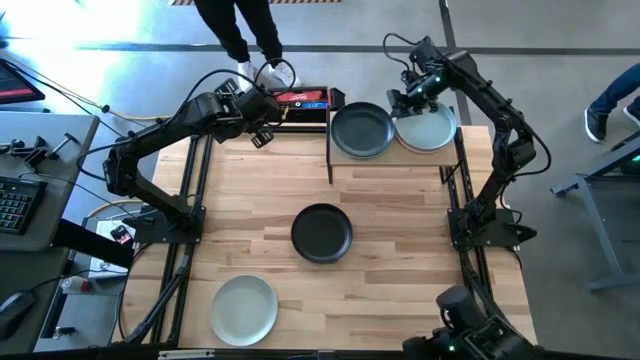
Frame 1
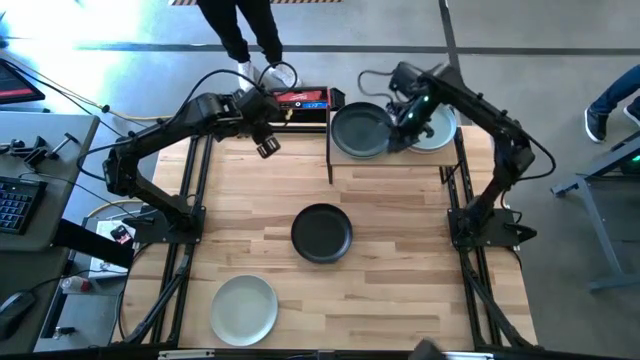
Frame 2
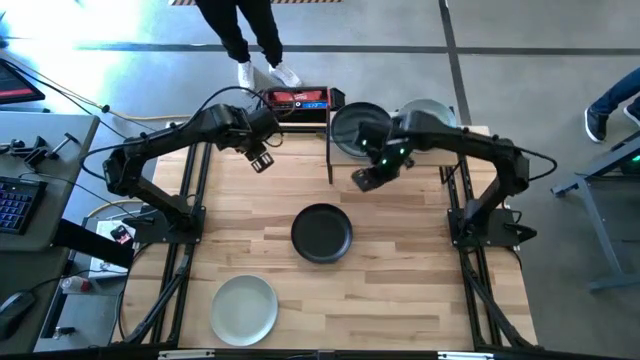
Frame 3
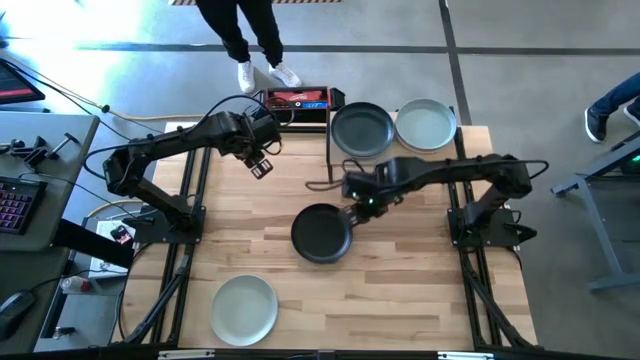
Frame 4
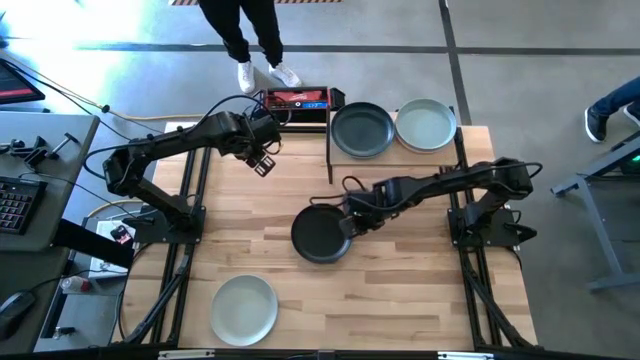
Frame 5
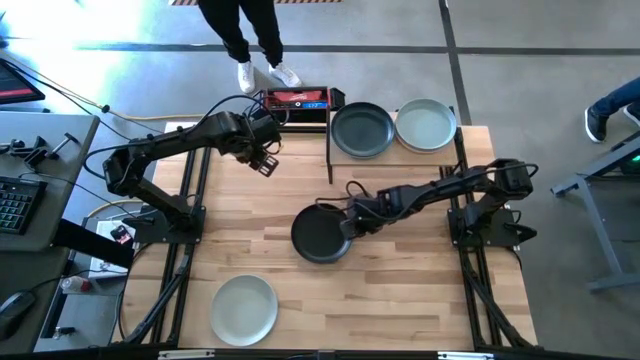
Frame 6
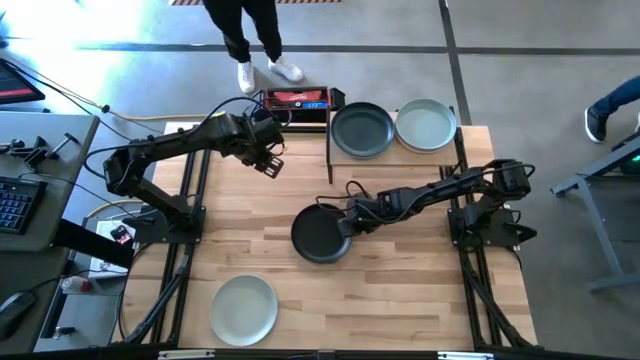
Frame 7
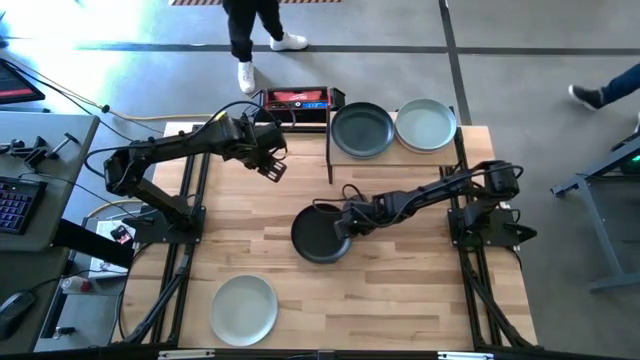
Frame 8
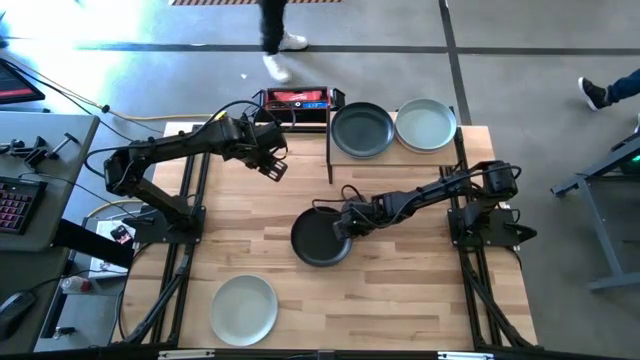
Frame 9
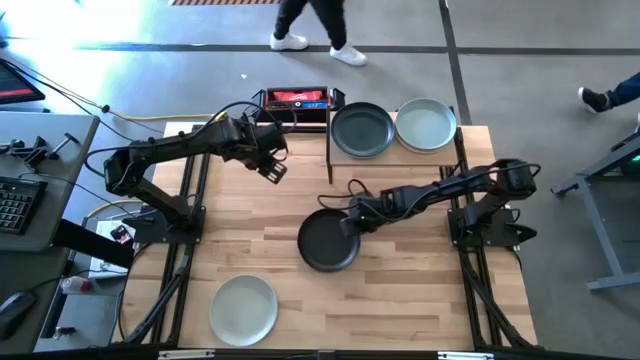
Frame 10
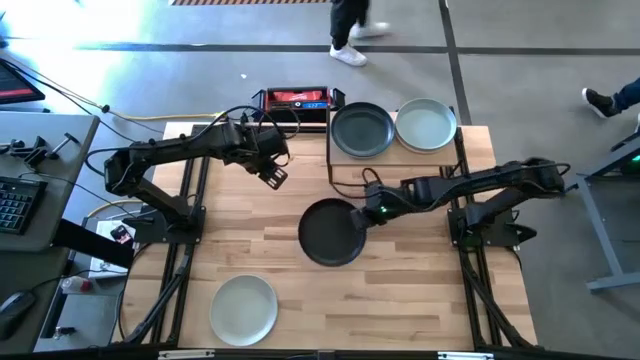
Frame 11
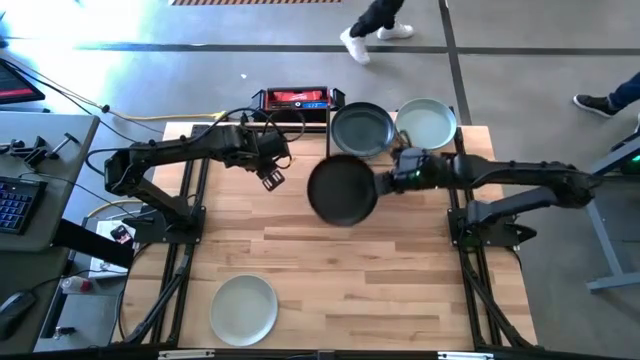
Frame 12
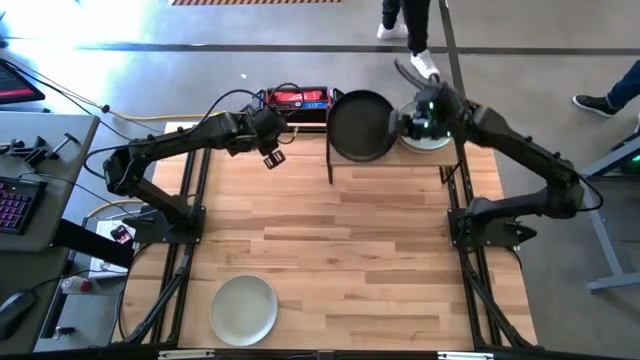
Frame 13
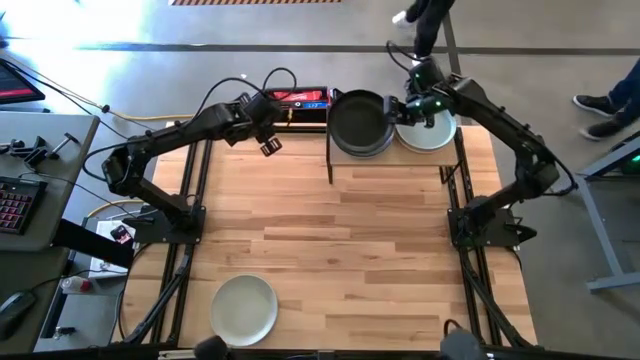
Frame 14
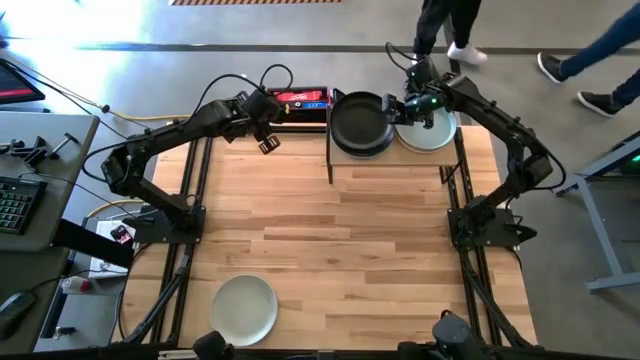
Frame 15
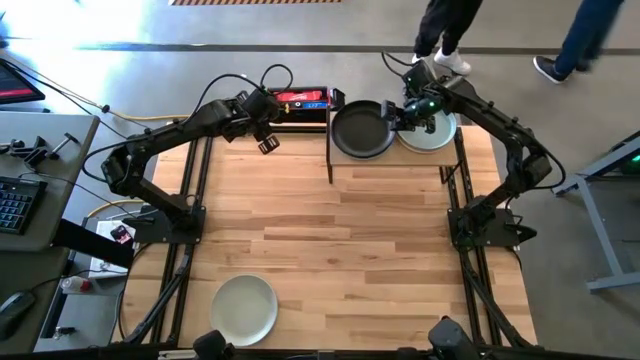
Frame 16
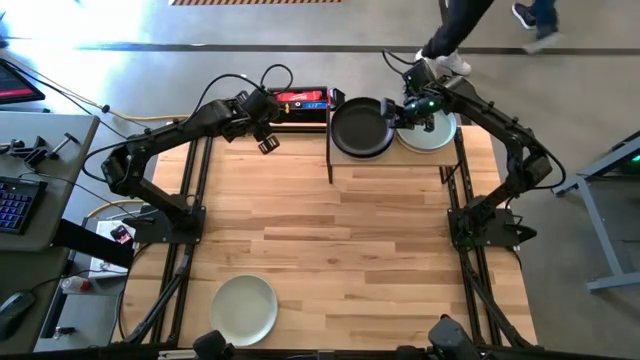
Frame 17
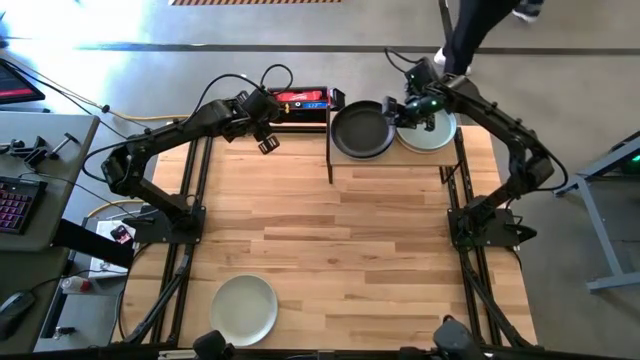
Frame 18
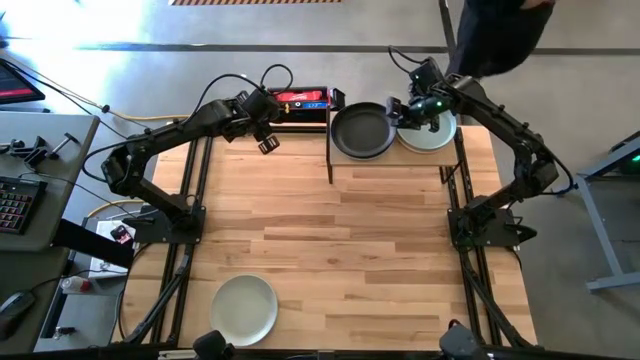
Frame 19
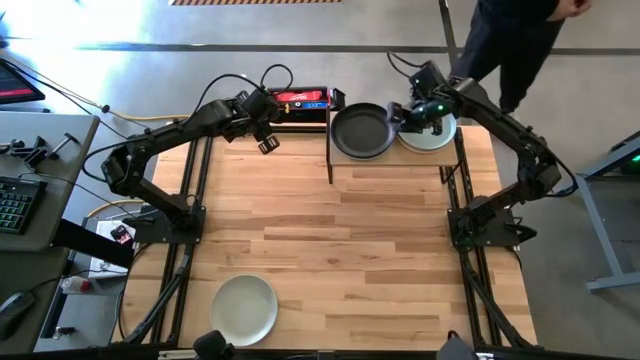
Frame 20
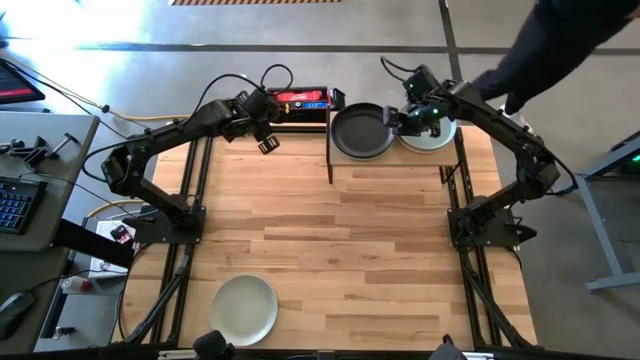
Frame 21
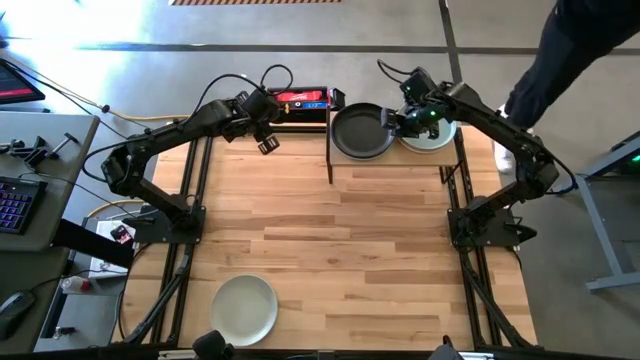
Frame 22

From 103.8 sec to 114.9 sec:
Task: Place and stack plates onto a shelf
Stack the black plate on top of the dark blue plate on the shelf

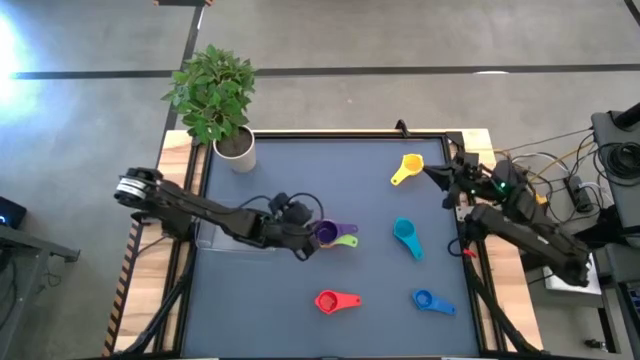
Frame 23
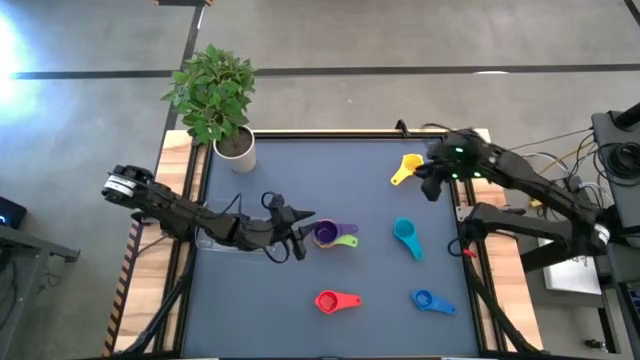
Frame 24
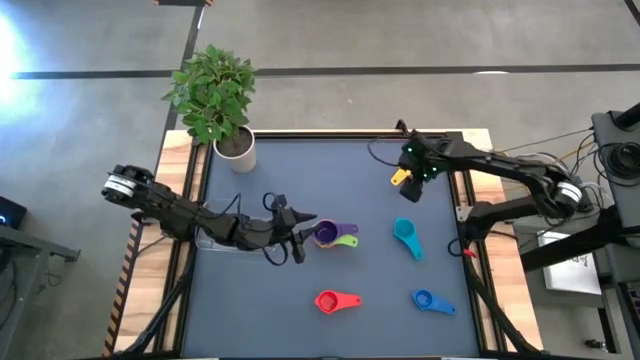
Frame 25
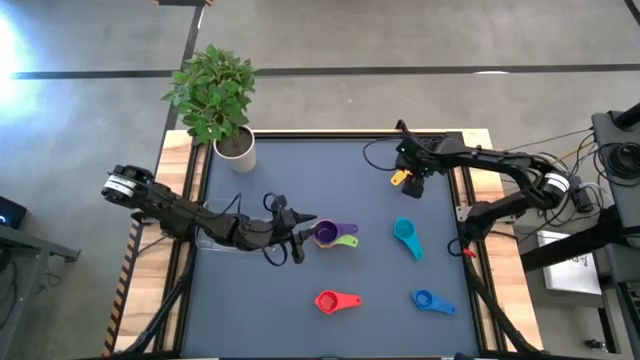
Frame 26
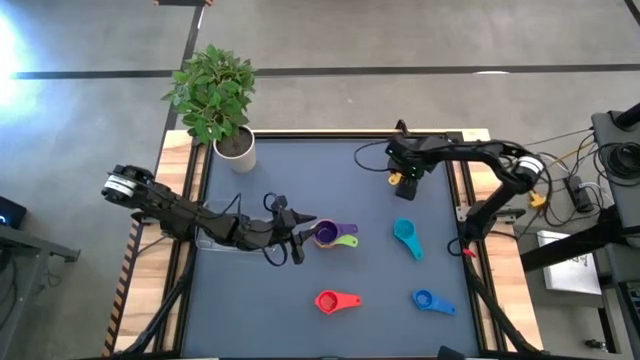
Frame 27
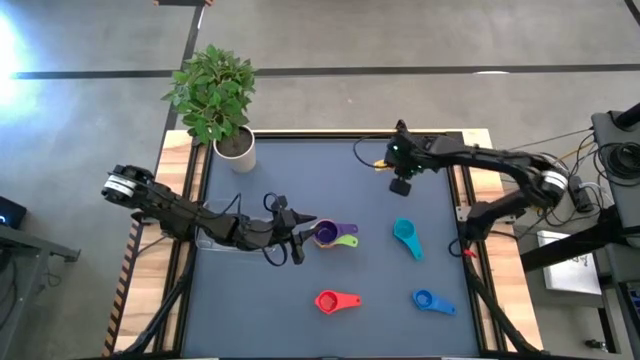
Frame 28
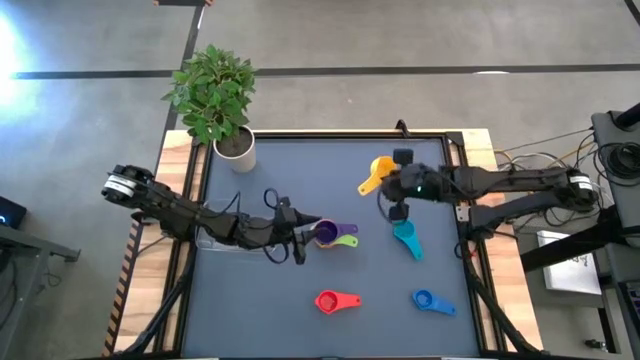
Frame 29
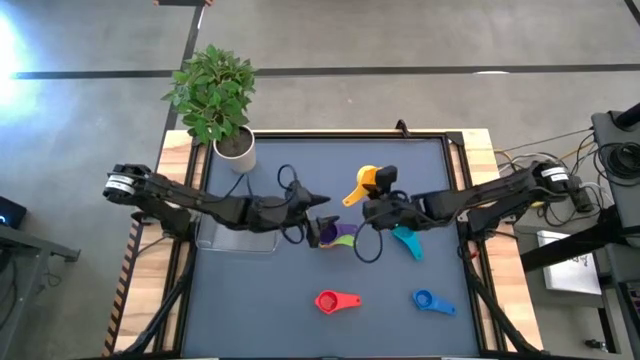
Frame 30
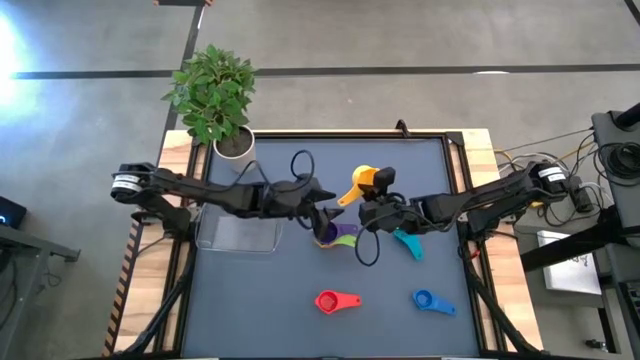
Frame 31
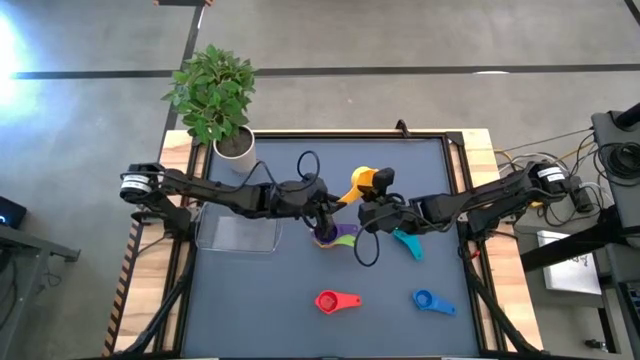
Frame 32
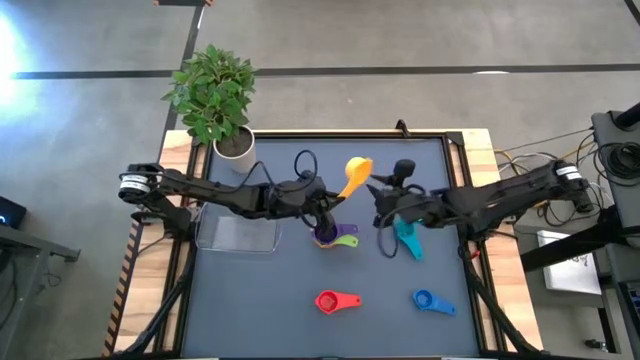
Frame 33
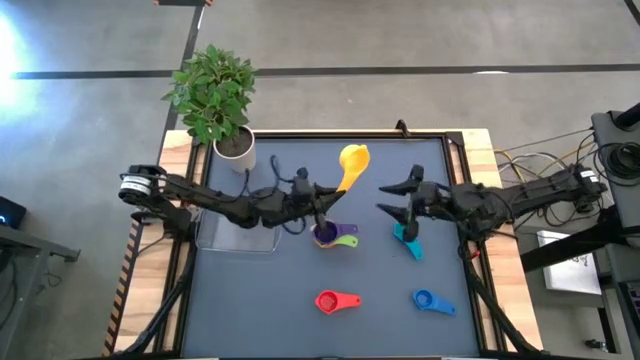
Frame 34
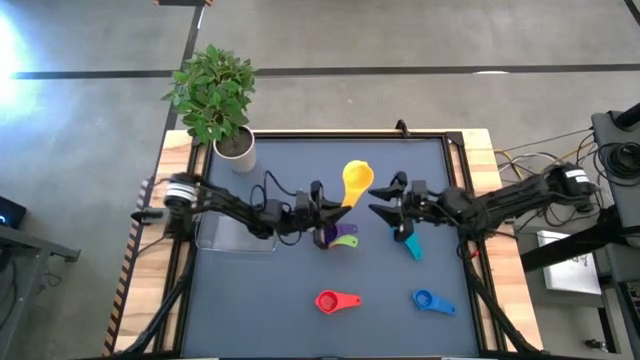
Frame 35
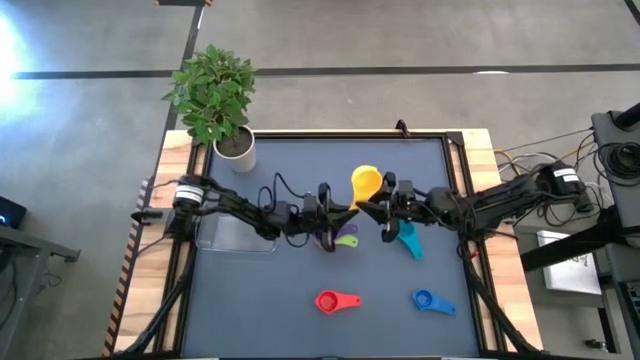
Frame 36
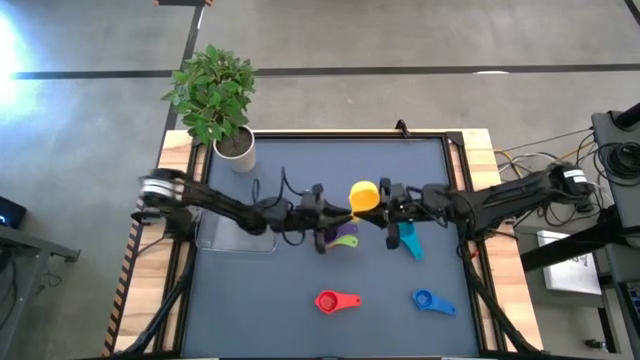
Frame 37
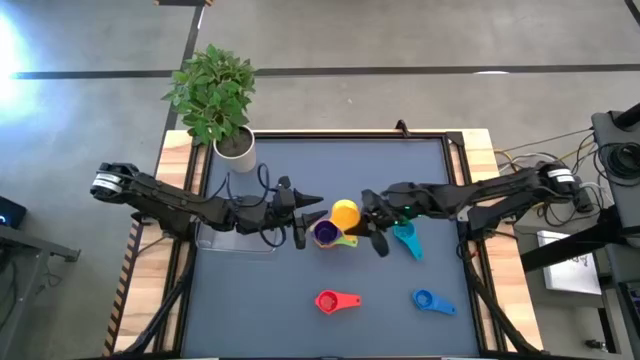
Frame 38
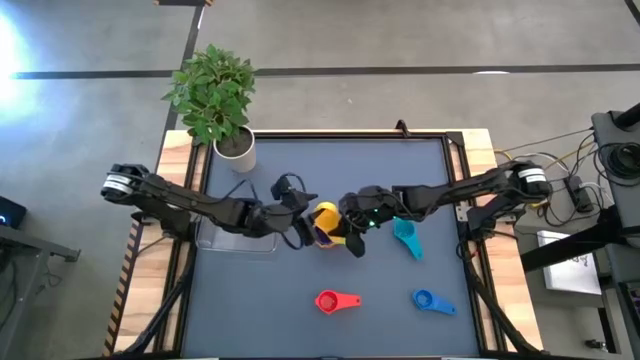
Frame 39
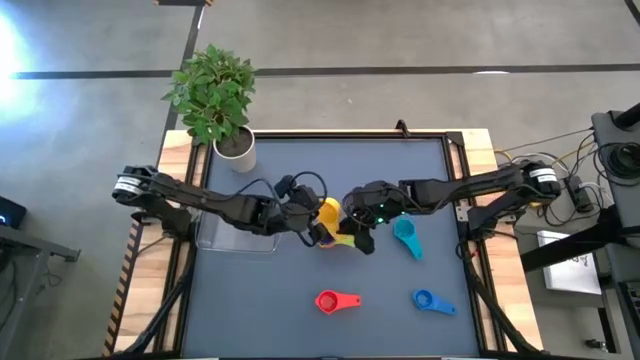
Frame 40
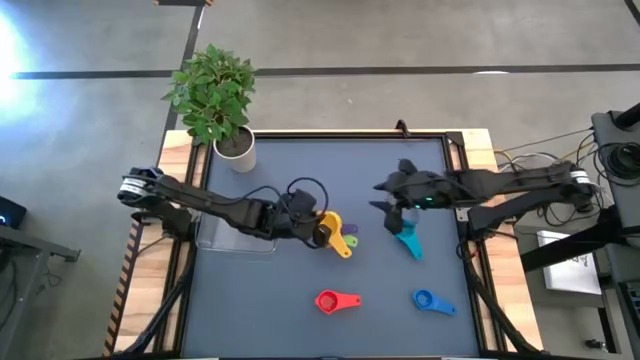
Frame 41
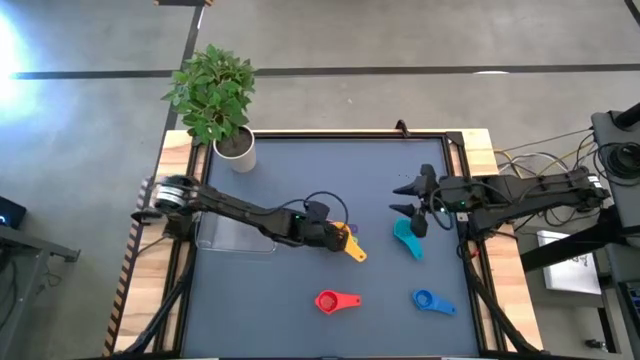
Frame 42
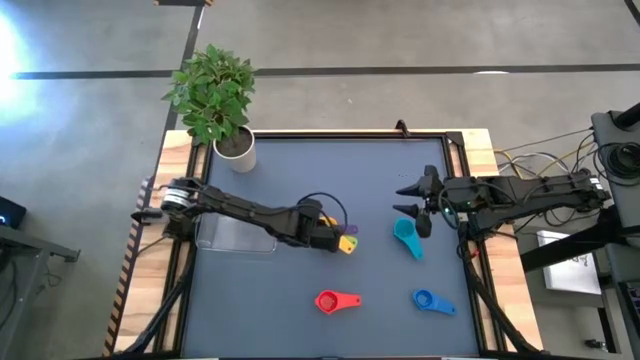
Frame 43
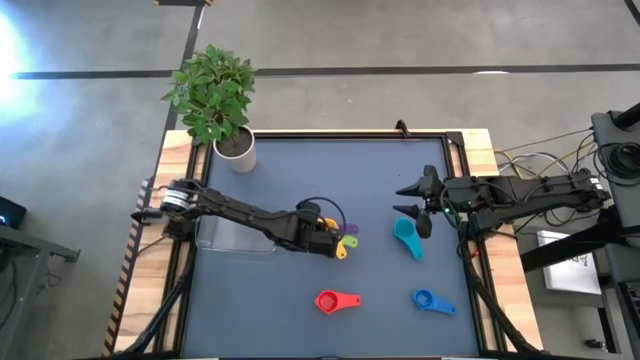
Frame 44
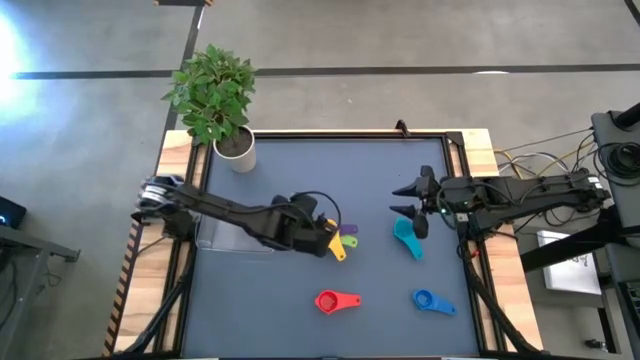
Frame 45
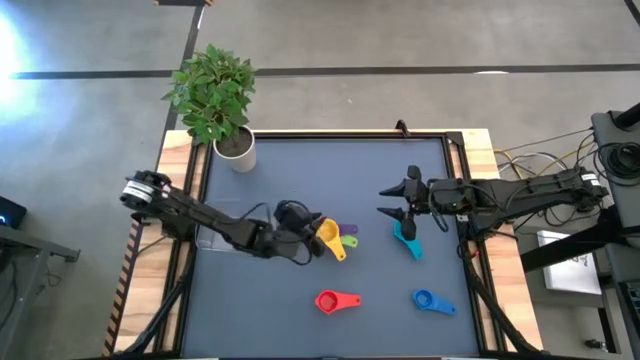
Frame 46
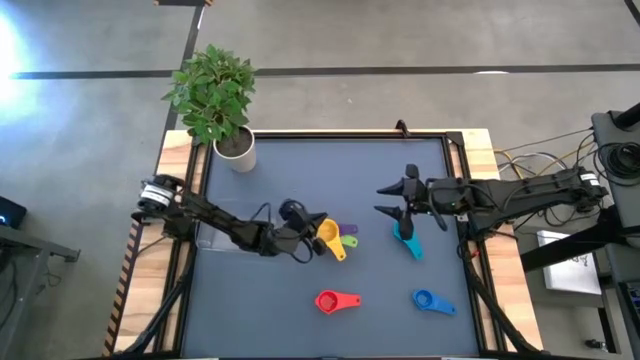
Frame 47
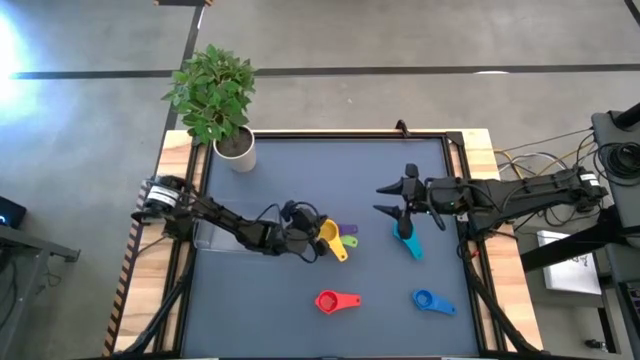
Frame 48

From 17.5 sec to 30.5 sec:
Task: Nest measuring cups in basket
Stack the yellow measuring cup on top of the purple measuring cup
